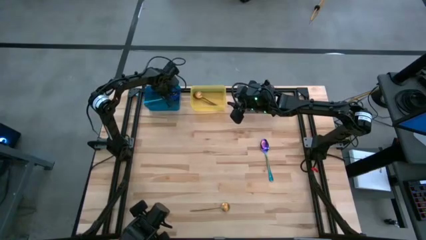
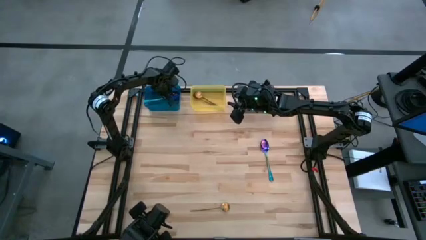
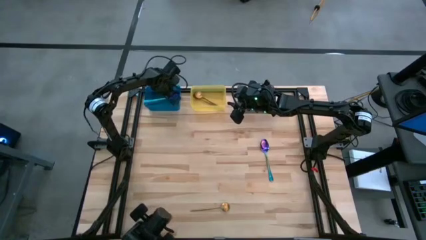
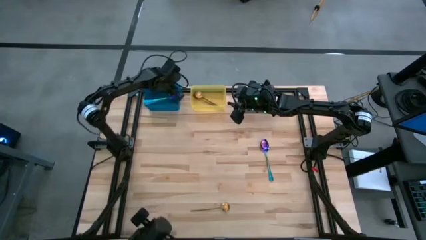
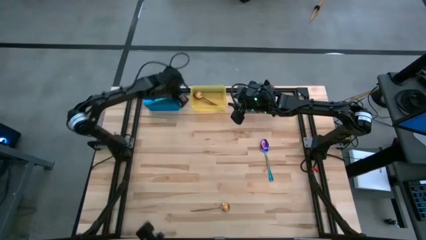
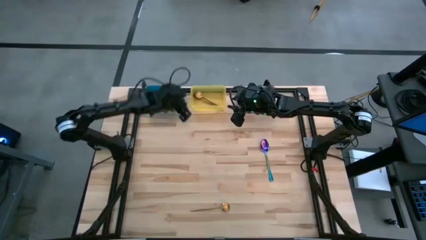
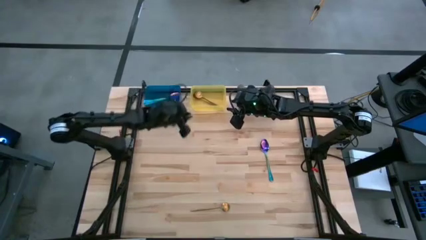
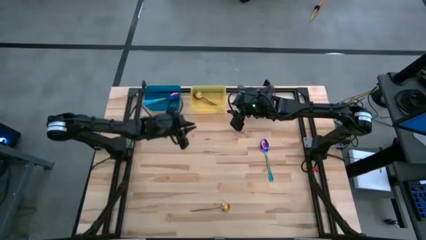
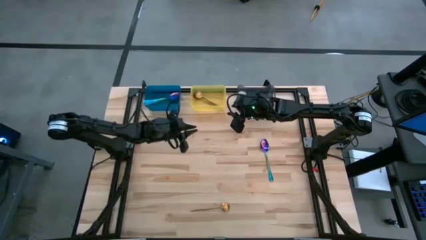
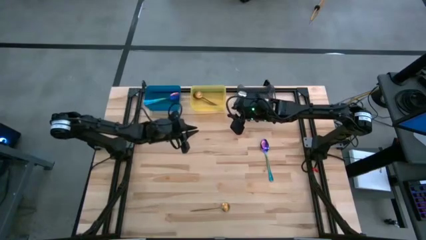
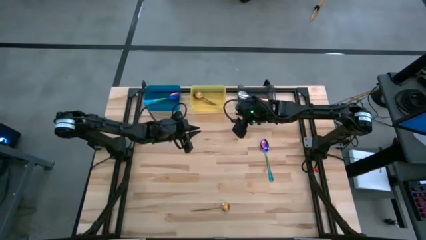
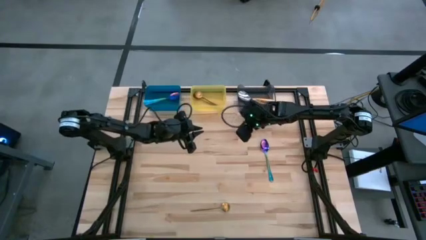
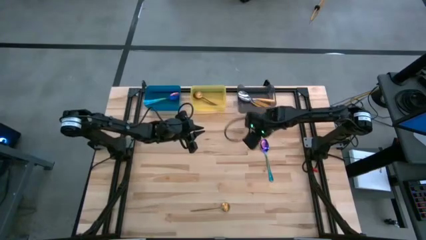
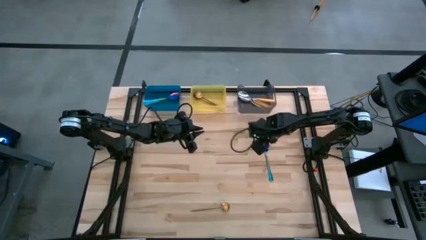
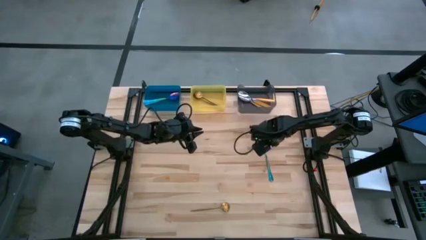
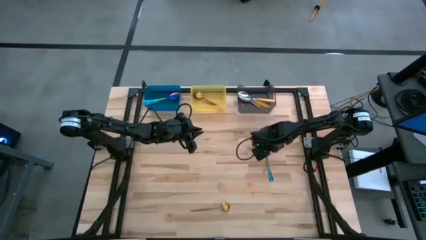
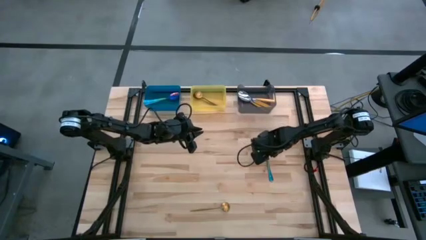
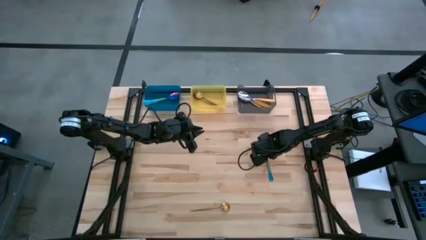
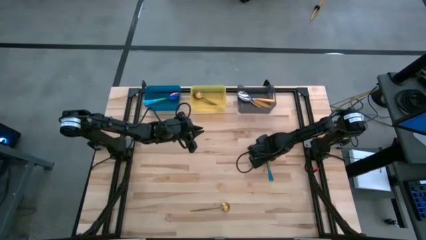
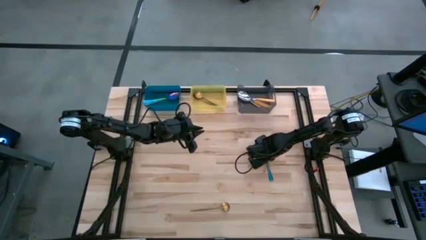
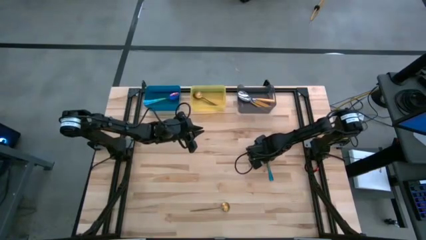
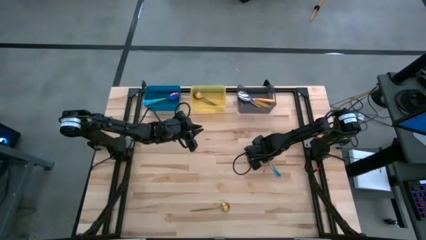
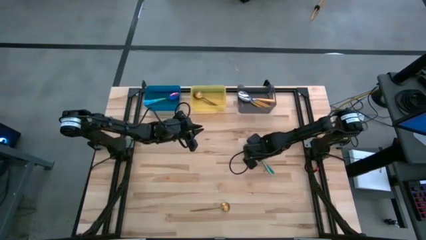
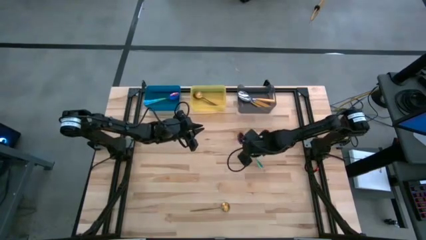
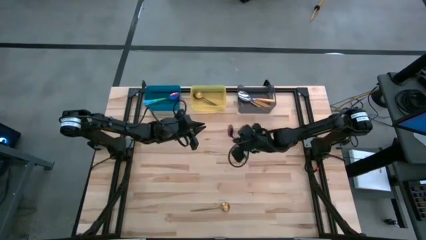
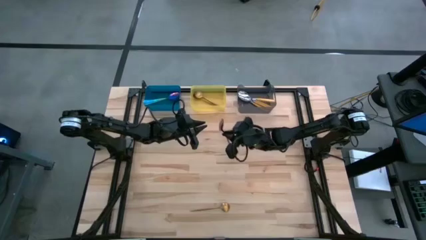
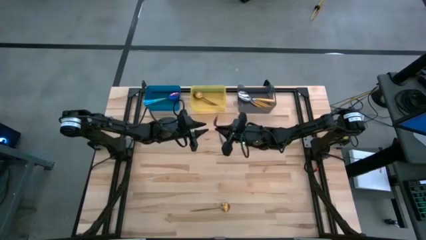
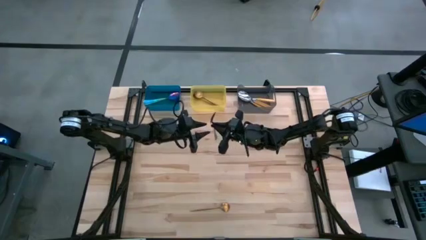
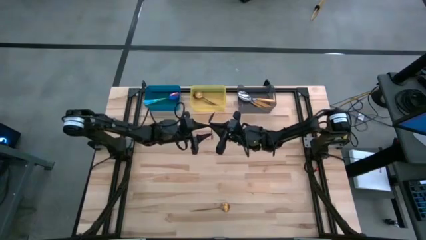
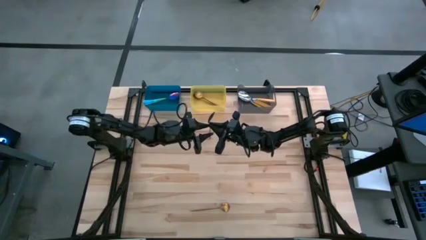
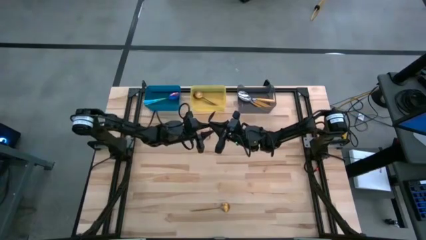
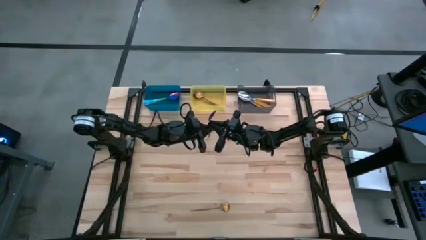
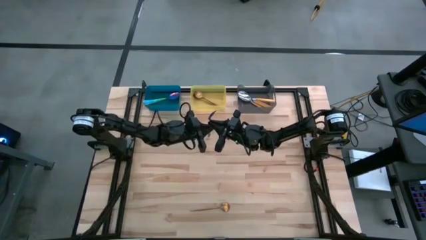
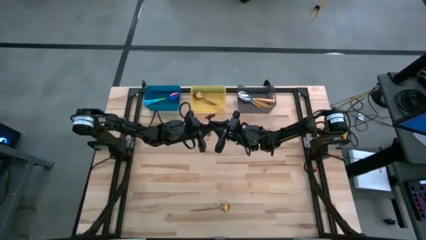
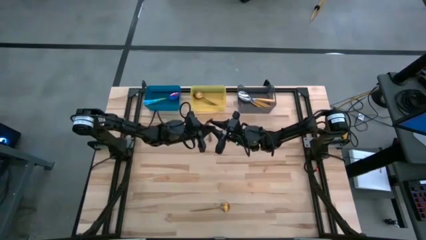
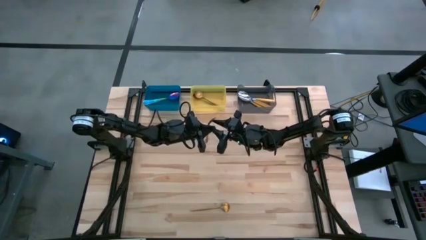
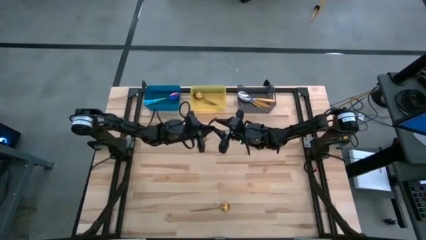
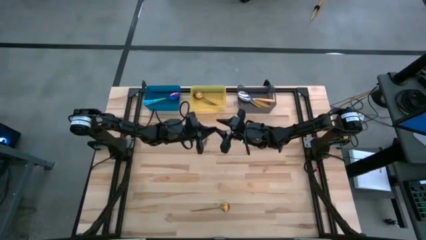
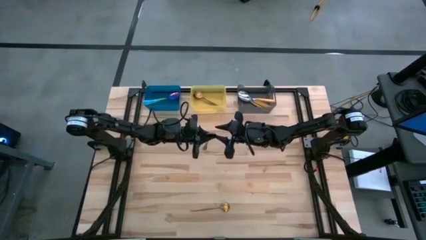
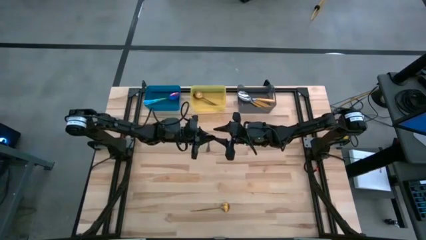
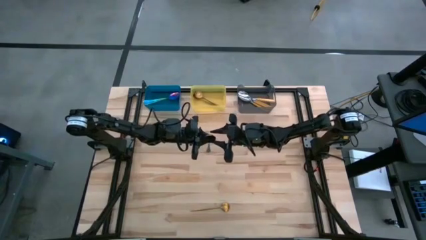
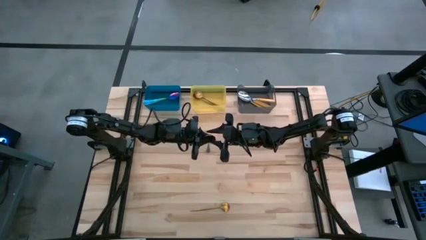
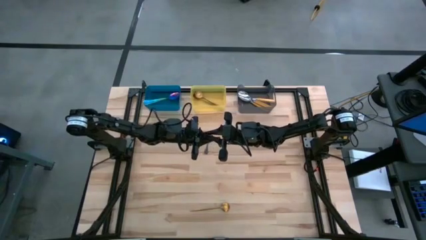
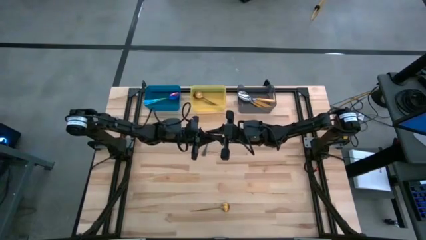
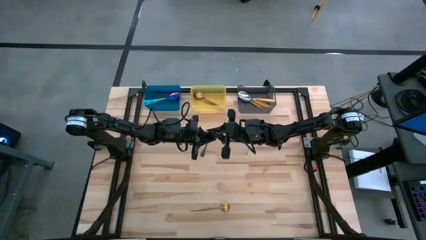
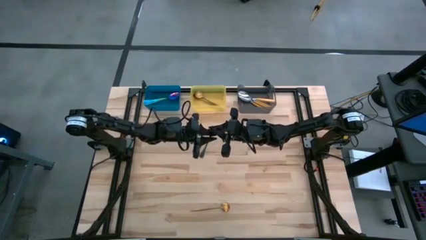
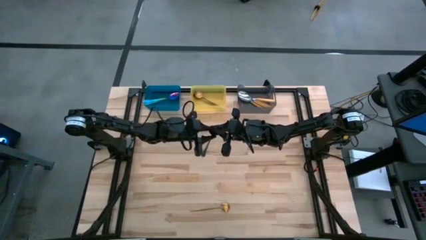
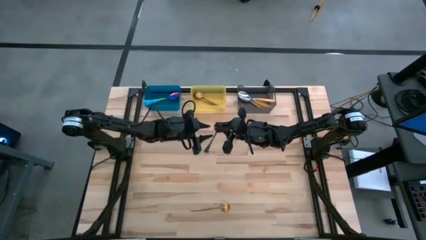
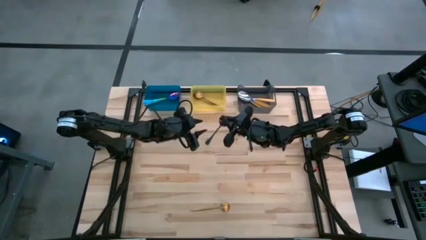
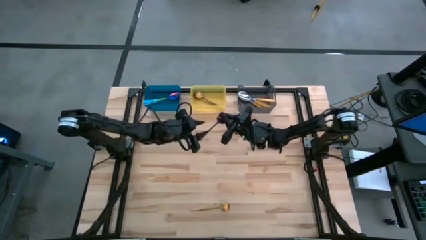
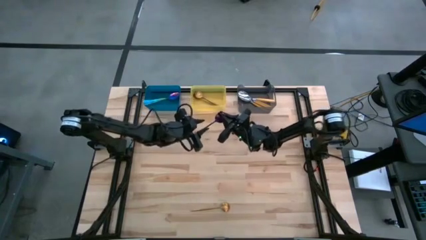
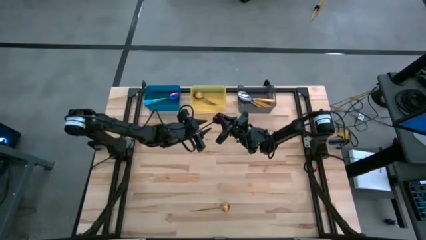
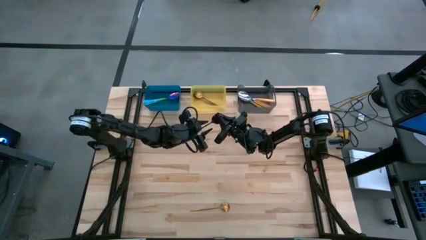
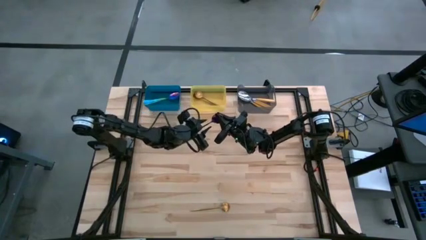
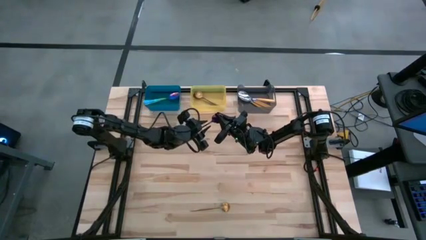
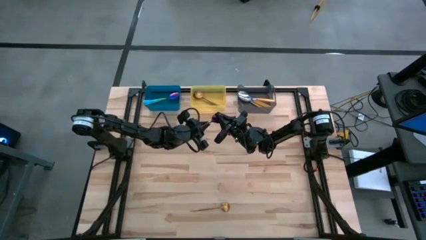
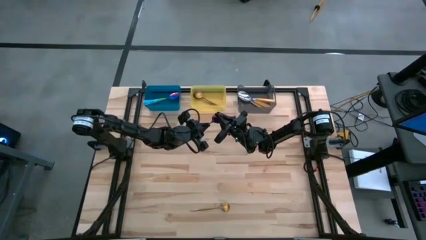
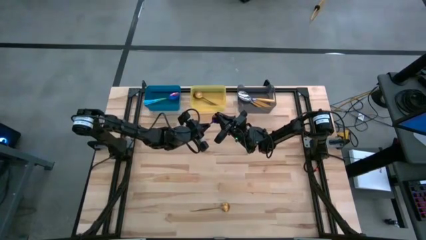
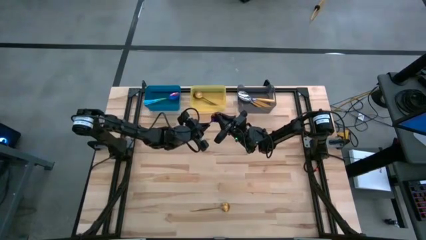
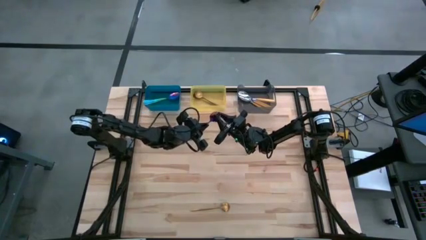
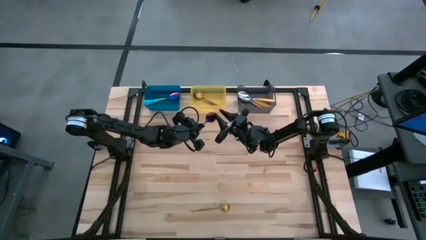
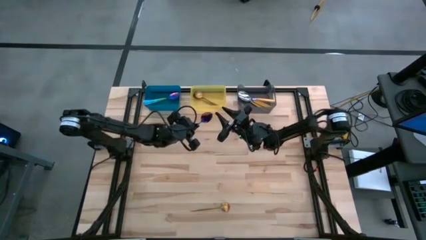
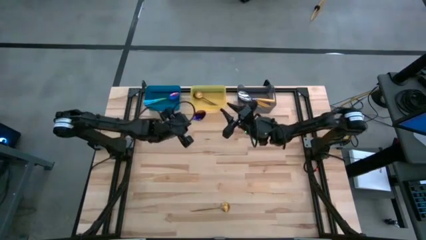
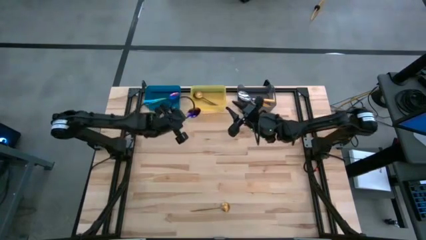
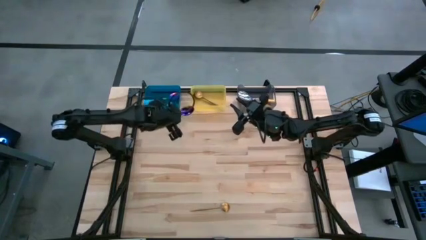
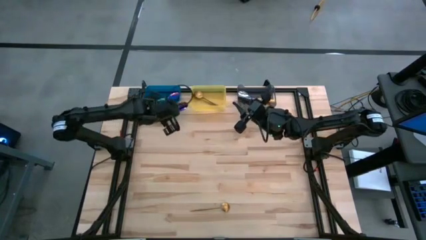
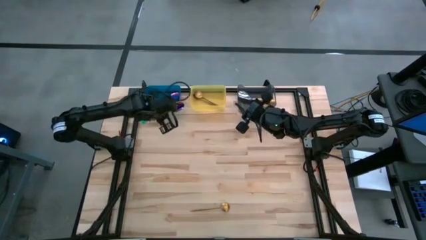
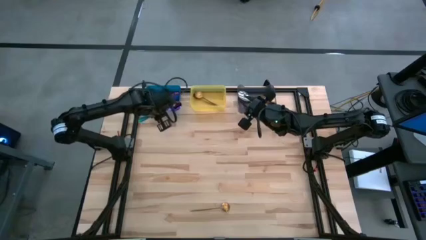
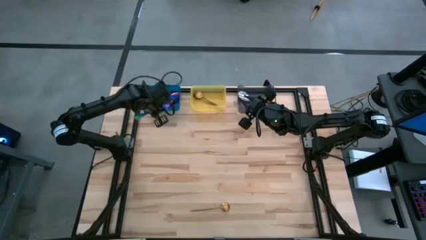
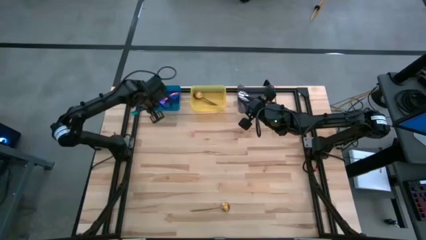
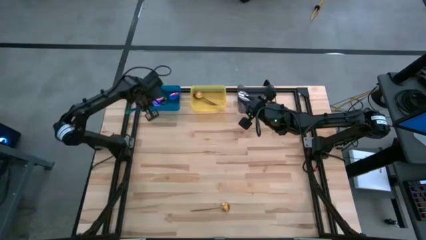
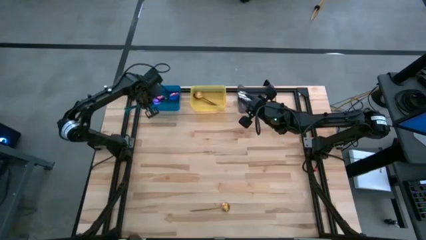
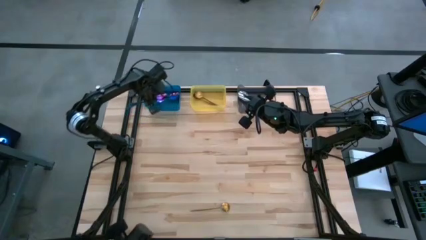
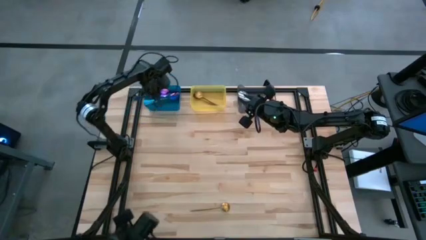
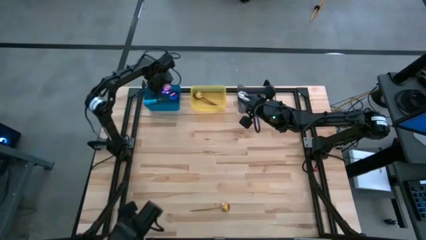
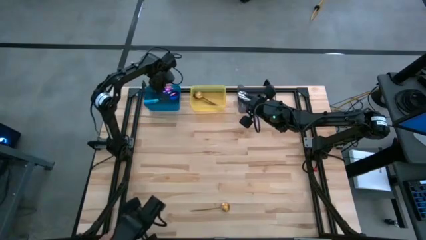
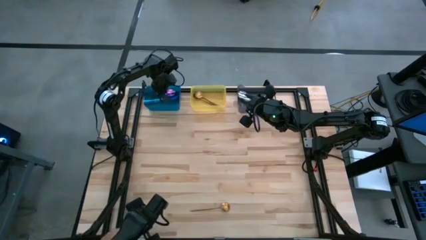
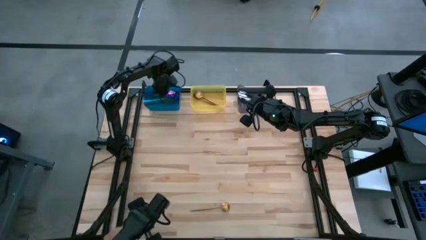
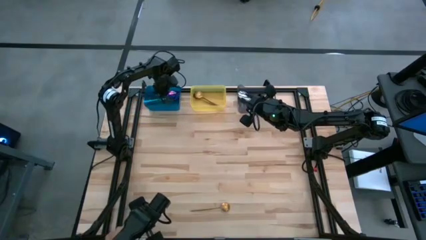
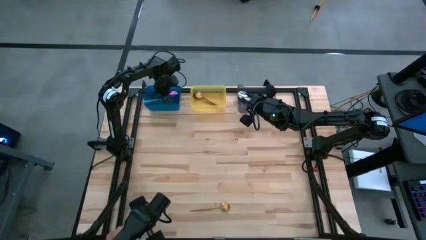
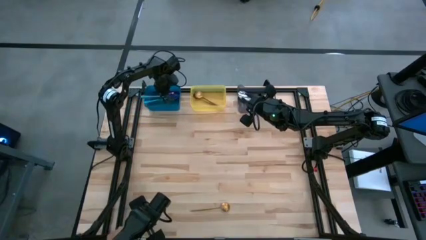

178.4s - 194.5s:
Task: Sort silverware by color (type)
Put the blue spoon into the blue bin
